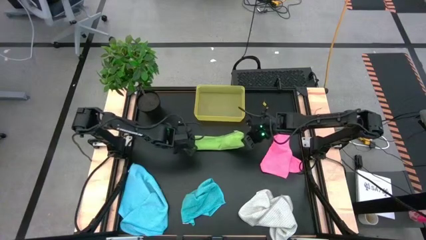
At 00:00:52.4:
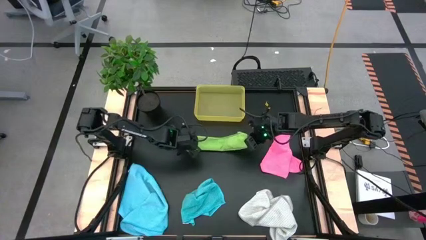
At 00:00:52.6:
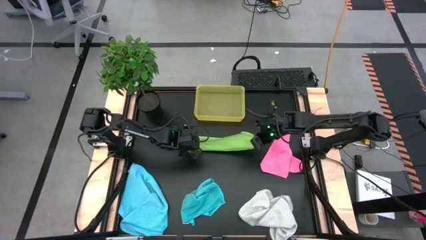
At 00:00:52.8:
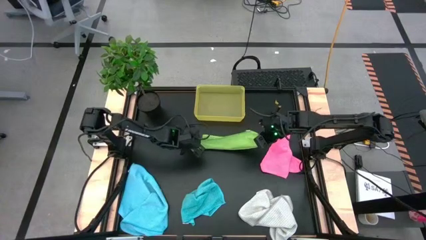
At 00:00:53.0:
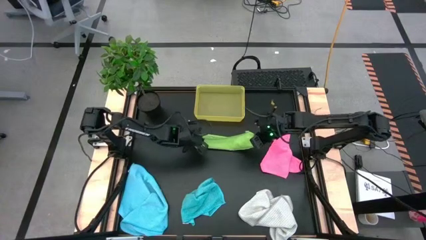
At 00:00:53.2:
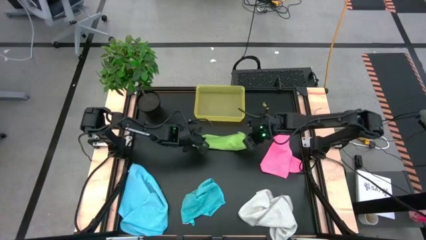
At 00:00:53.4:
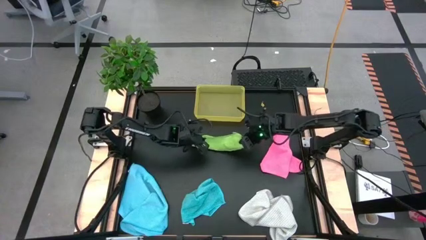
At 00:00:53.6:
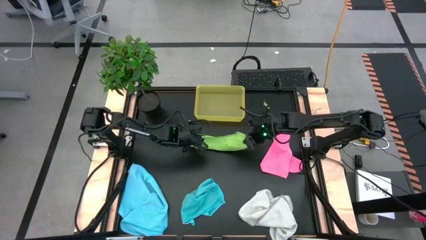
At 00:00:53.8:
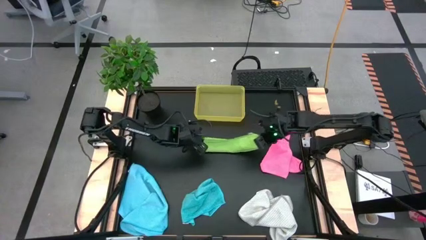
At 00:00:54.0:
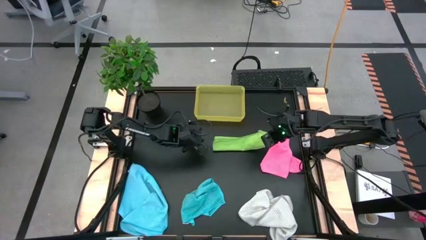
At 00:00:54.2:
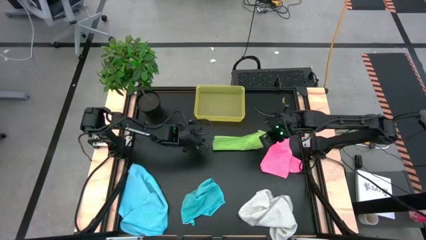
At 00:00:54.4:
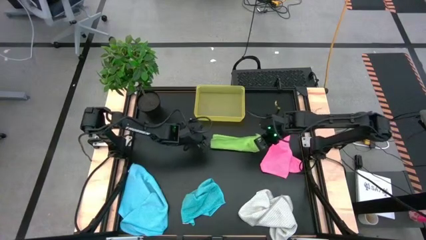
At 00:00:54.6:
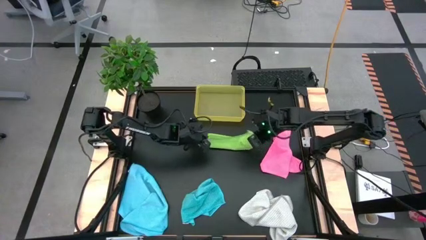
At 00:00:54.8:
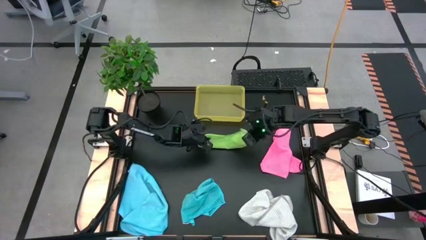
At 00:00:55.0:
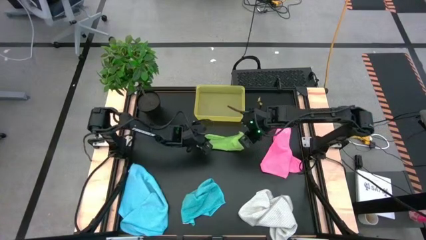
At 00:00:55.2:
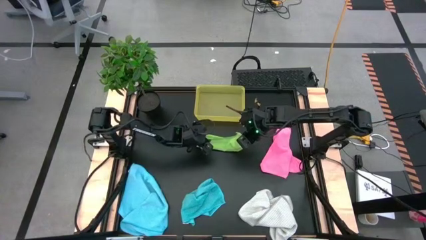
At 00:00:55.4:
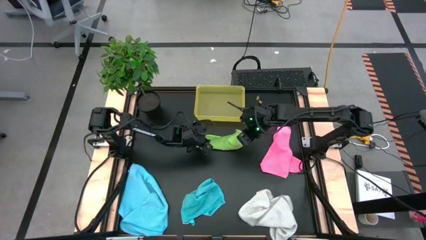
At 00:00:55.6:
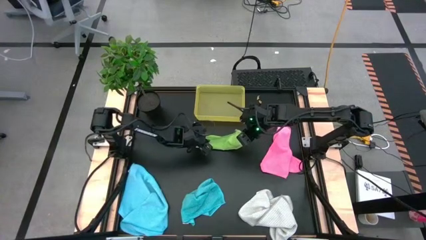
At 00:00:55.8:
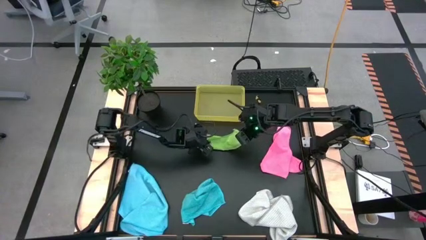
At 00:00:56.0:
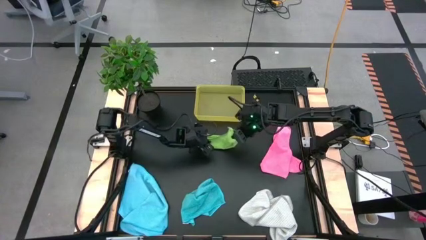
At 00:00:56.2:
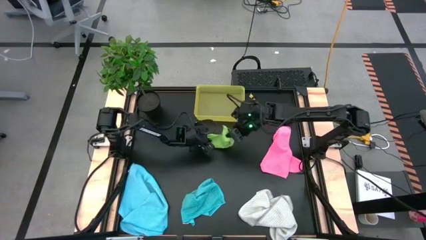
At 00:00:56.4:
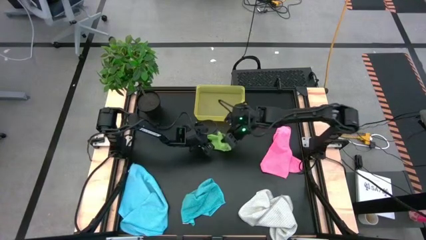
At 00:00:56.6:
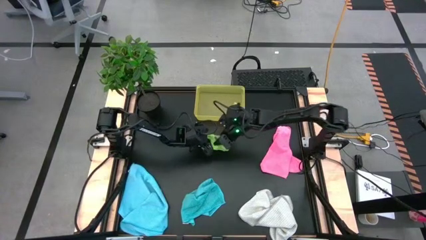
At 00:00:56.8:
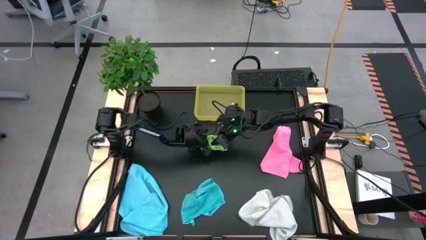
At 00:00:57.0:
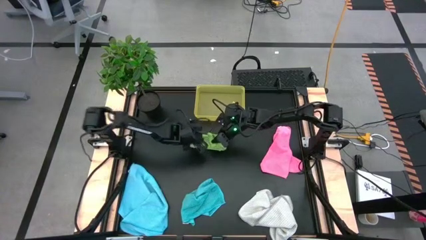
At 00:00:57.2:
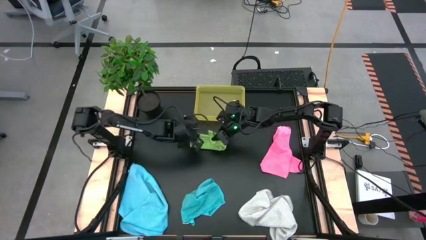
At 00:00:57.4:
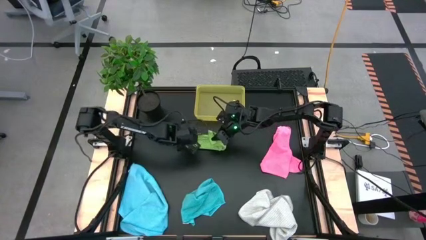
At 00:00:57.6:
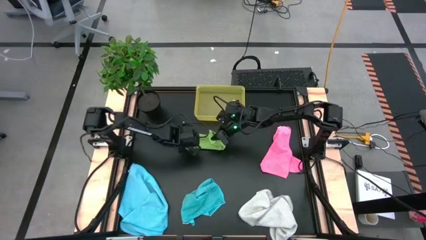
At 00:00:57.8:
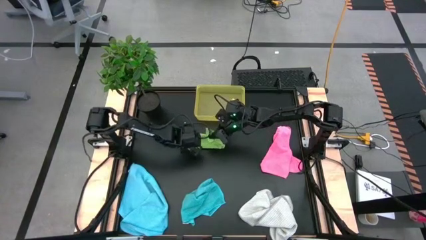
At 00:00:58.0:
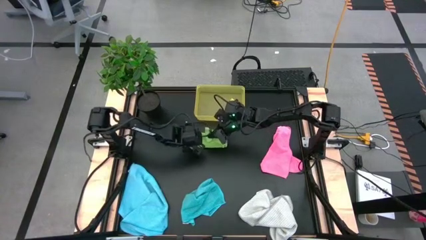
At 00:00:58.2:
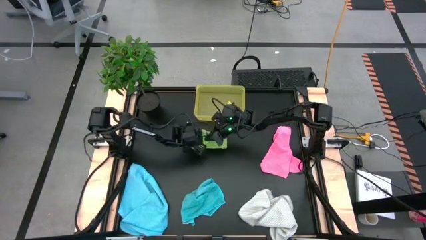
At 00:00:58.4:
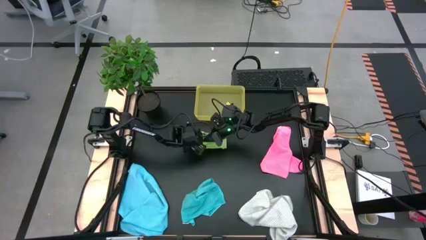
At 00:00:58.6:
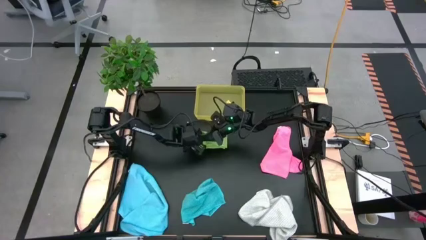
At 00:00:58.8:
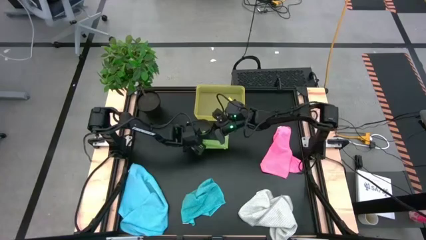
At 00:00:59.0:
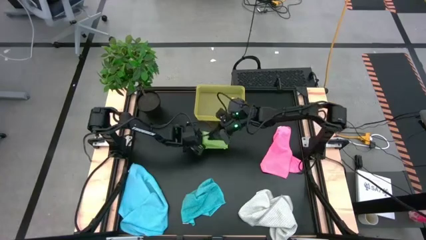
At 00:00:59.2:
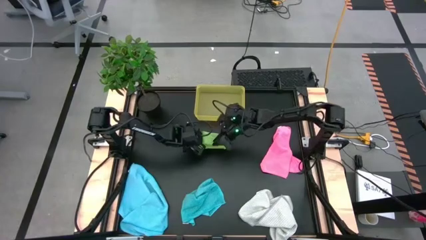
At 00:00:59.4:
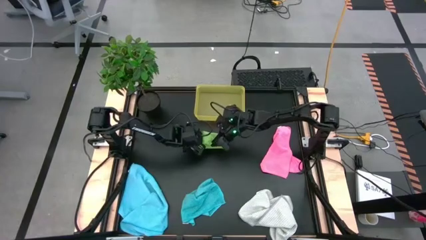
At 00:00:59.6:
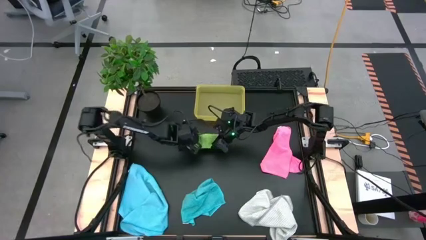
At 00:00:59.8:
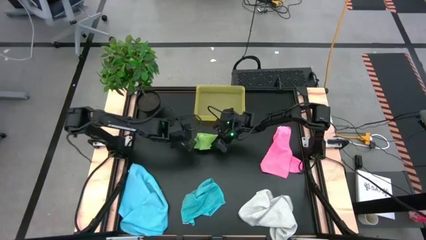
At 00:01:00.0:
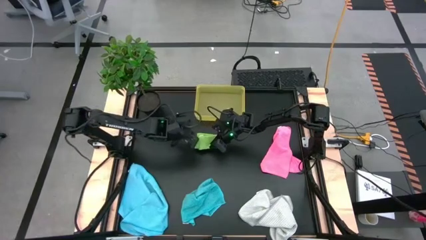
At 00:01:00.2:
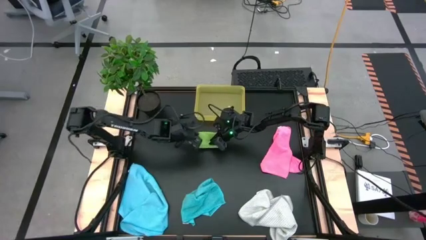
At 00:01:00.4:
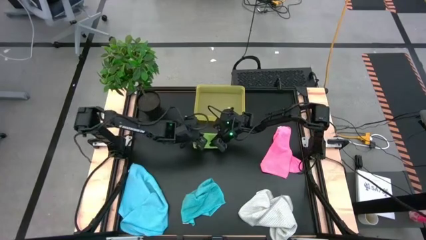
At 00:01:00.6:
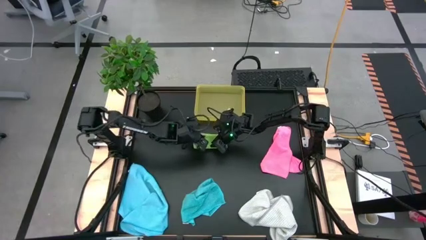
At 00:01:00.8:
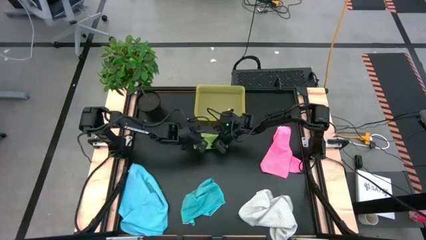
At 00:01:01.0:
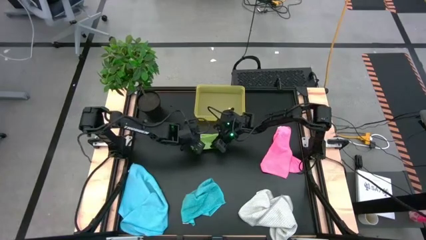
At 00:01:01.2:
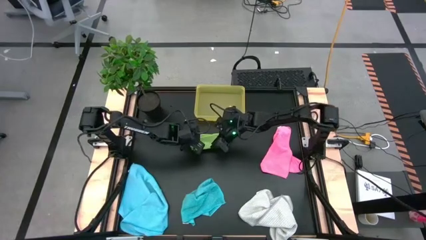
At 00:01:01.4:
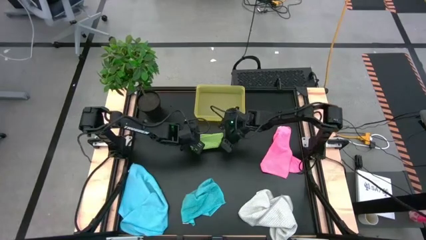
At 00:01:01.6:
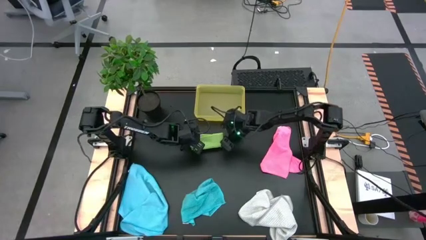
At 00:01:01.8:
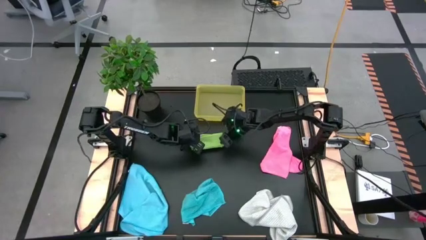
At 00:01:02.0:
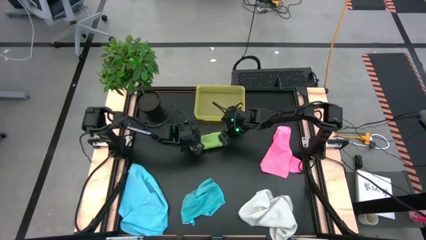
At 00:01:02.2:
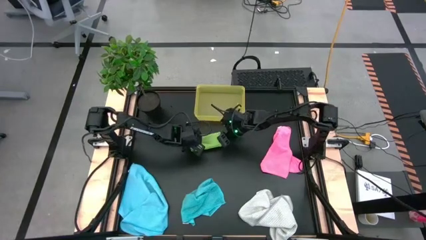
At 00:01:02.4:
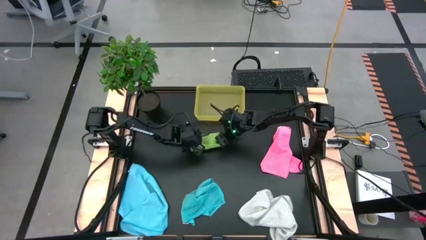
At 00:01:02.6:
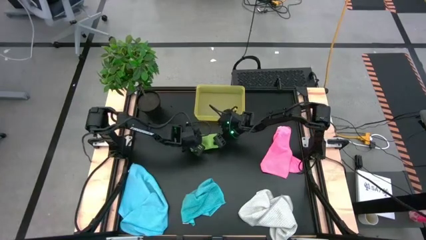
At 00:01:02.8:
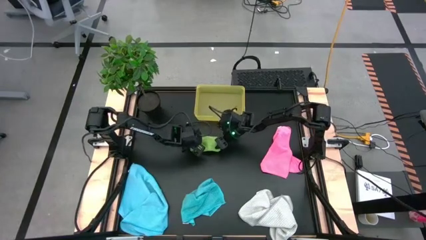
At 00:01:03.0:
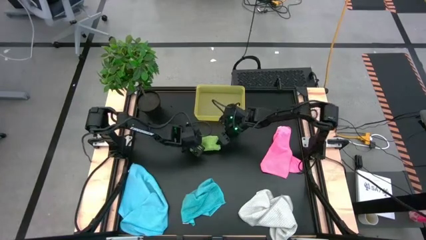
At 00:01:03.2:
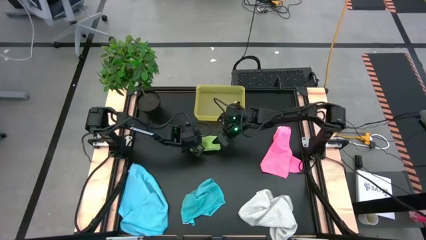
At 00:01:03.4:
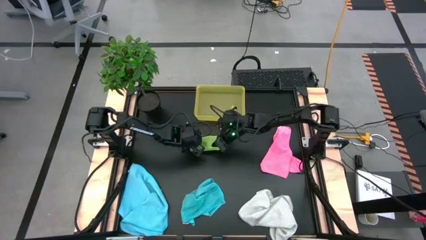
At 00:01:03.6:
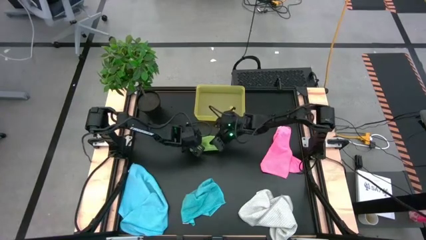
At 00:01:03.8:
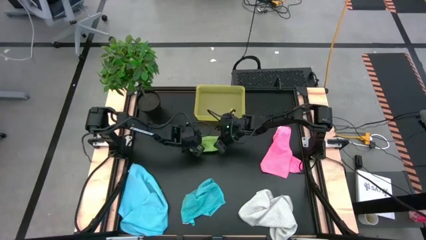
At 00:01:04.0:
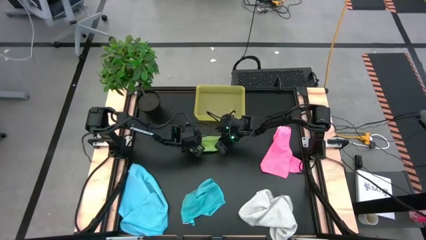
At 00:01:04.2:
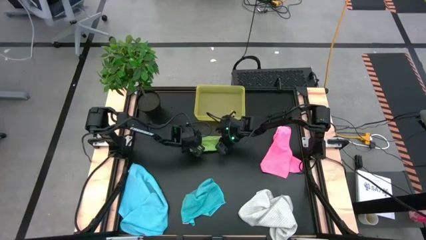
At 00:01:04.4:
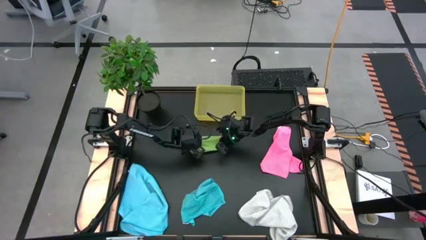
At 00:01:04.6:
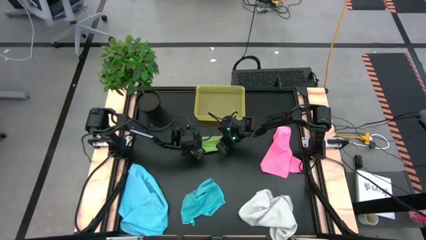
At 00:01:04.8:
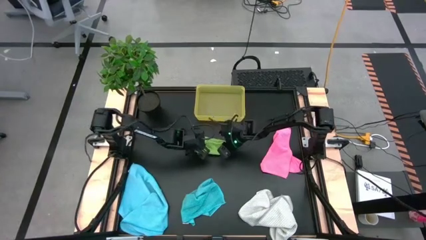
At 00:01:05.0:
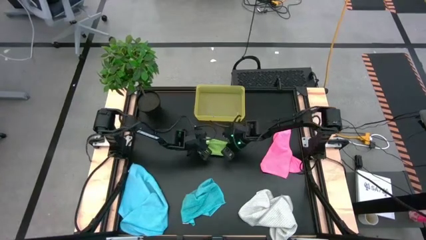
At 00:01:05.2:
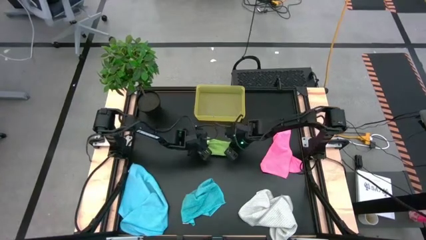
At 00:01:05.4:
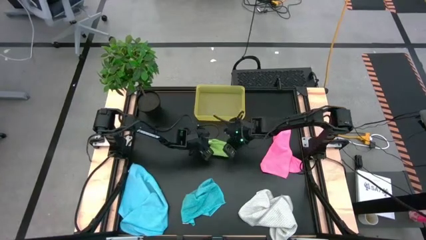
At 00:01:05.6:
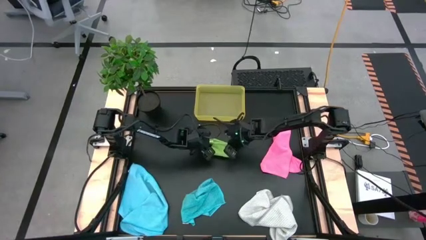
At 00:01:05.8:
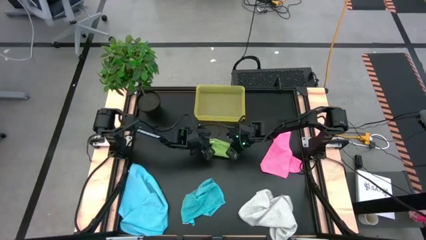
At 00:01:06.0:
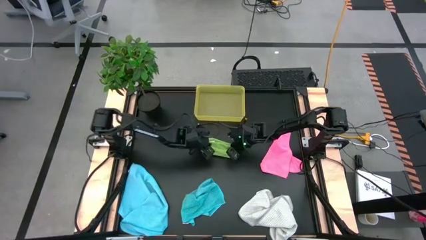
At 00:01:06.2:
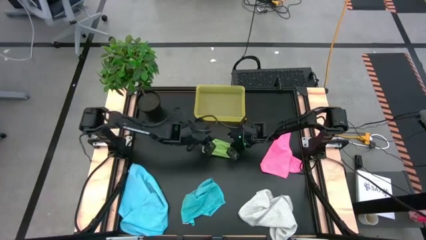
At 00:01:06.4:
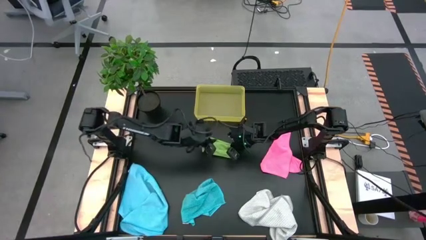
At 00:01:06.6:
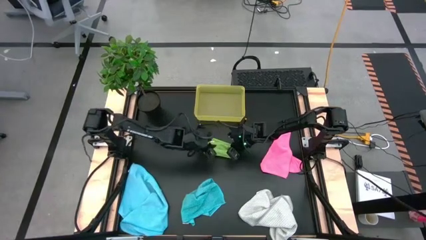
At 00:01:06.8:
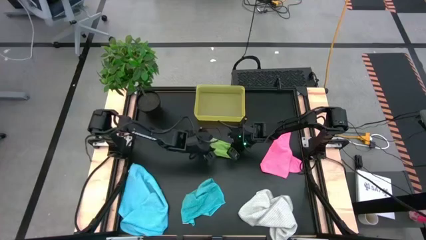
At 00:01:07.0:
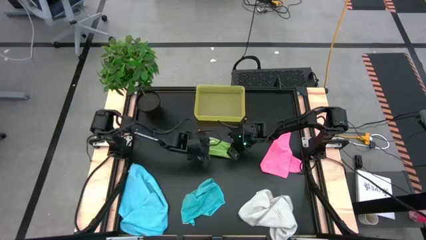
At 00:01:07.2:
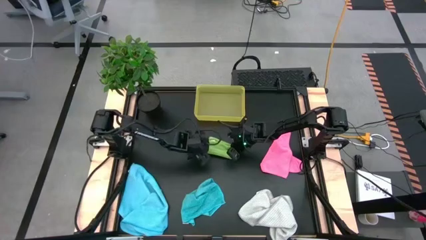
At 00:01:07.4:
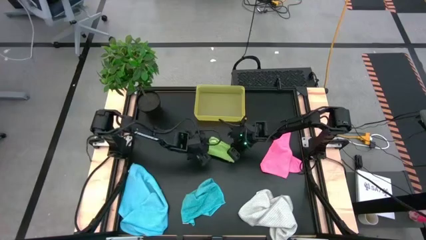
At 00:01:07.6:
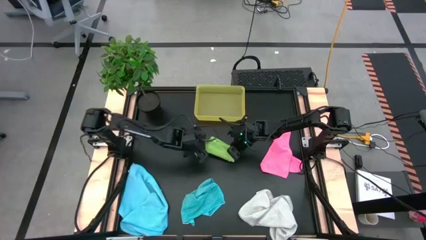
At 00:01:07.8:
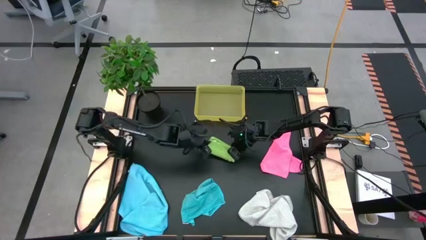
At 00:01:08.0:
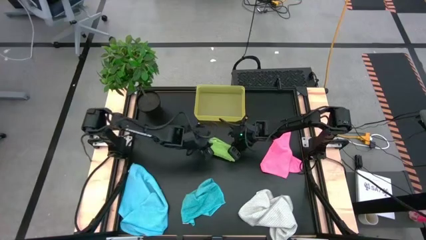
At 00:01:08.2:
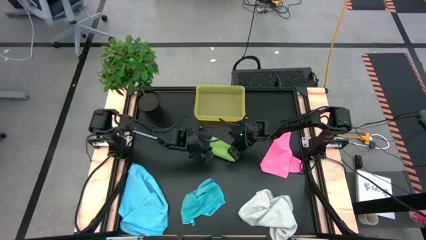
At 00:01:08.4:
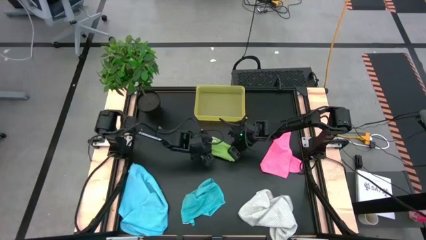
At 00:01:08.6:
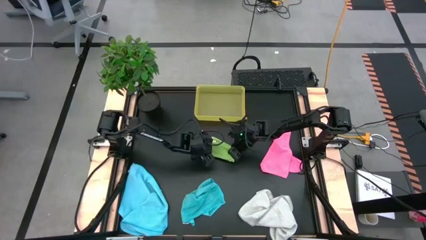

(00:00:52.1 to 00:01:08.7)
Task: Fold microfiber towels
Fold the green microfiber cloth
